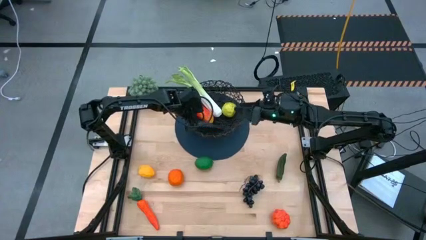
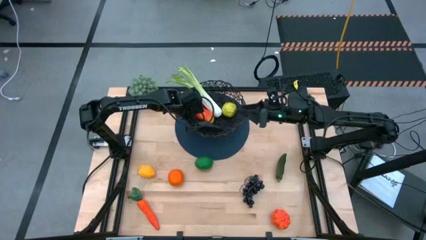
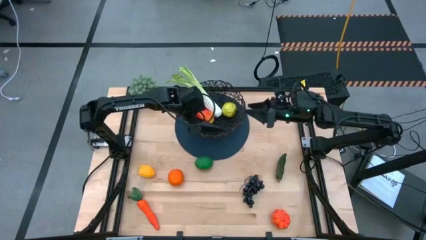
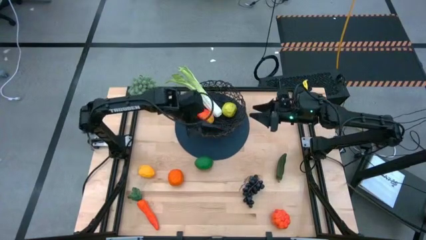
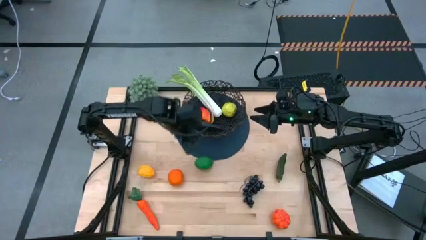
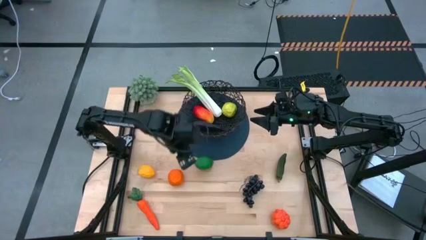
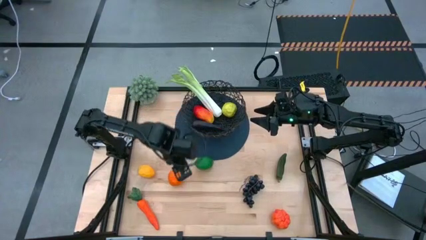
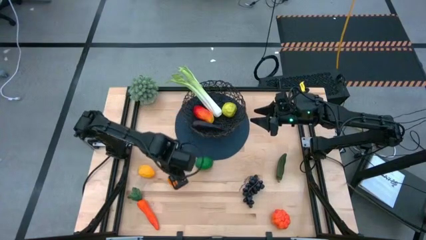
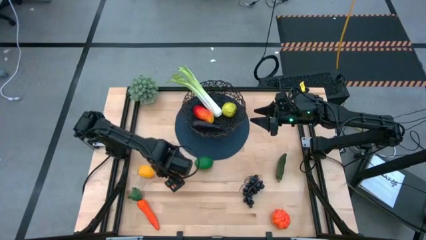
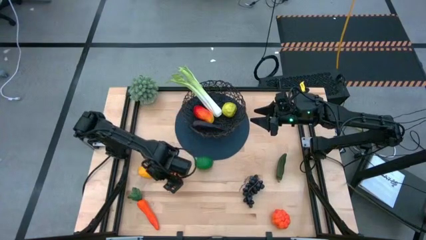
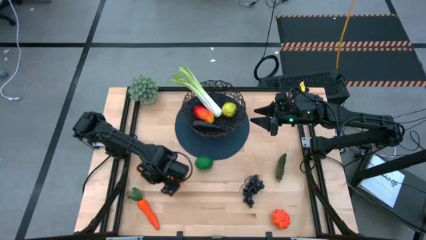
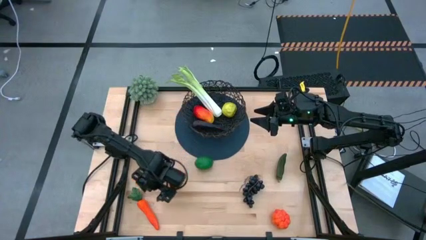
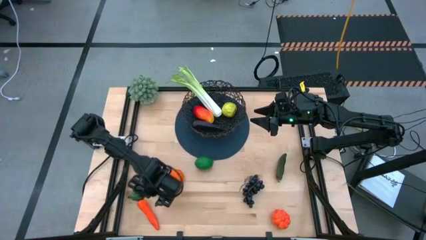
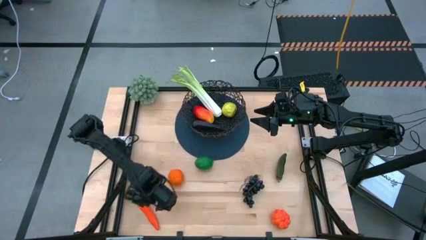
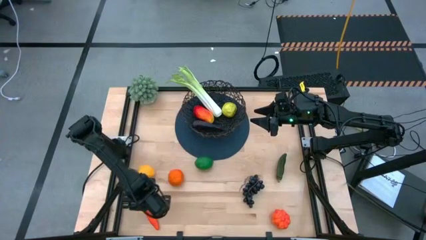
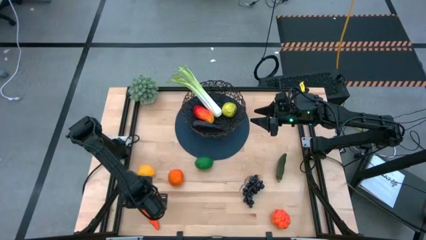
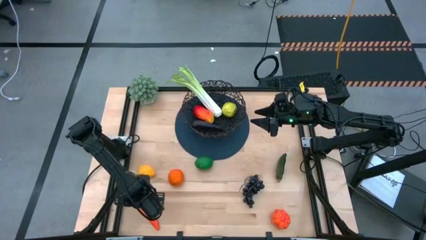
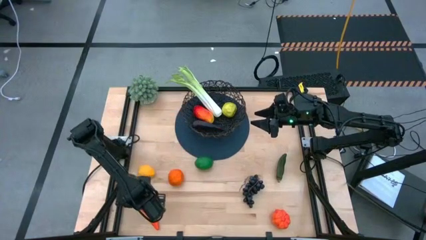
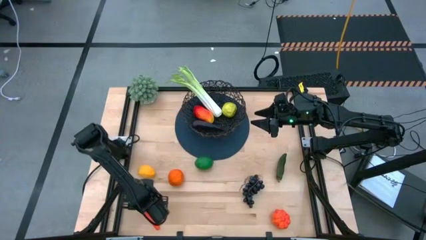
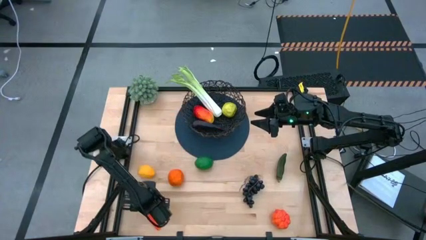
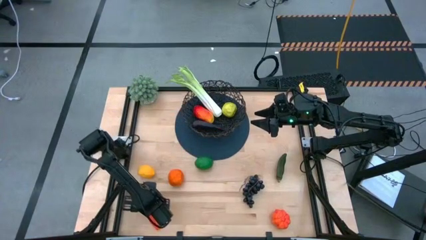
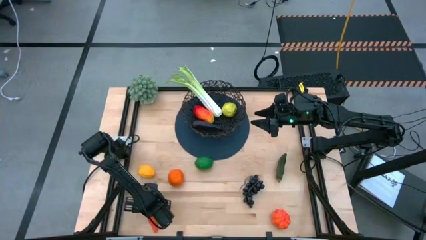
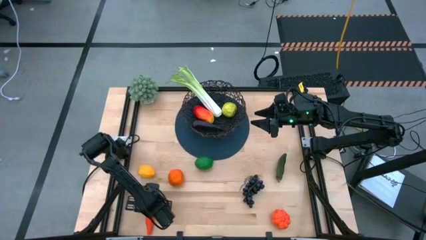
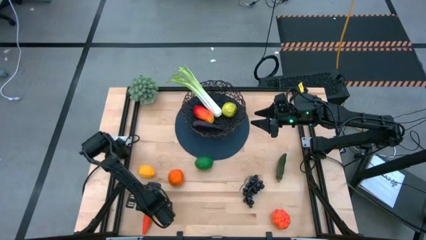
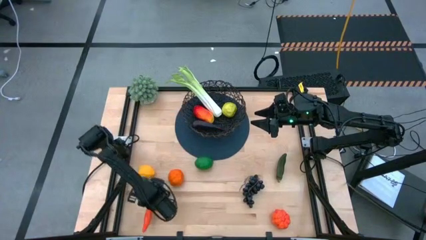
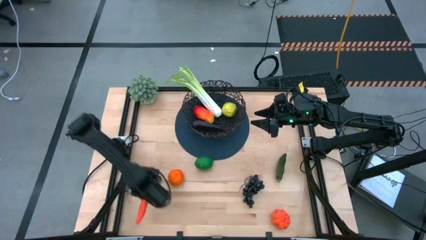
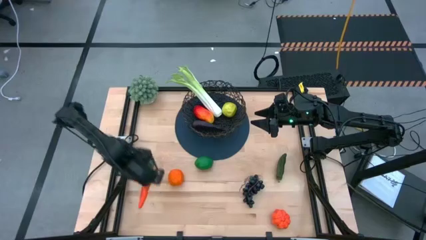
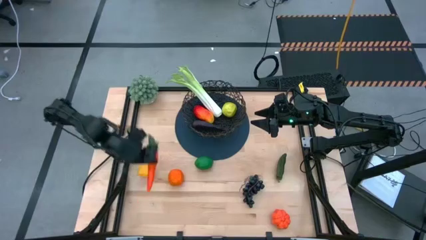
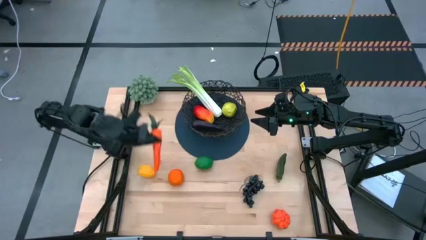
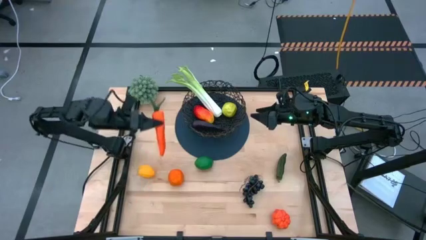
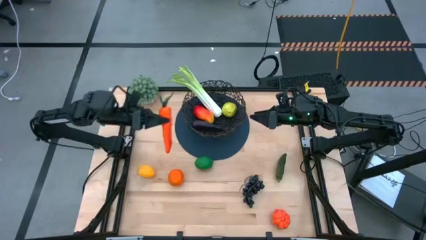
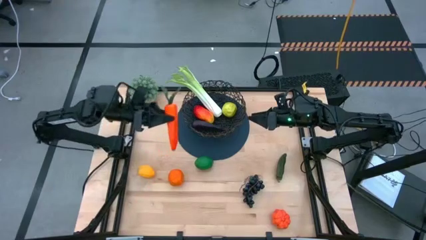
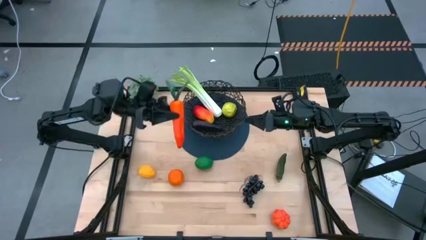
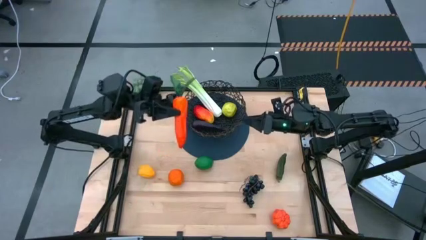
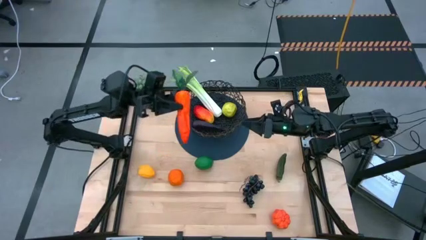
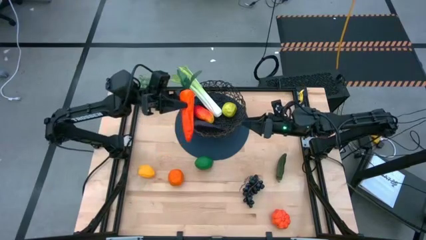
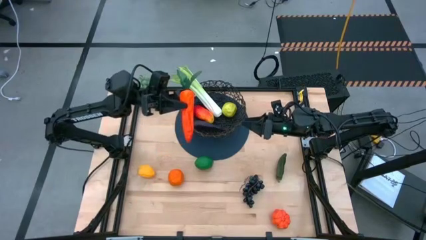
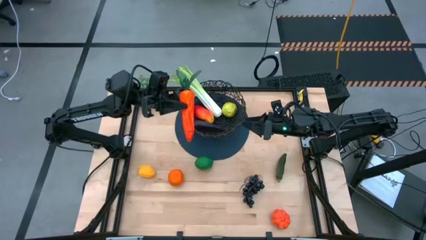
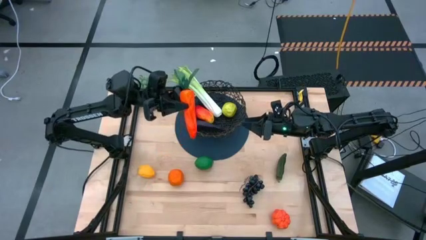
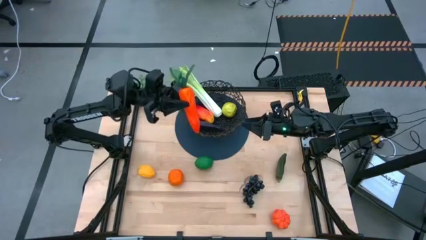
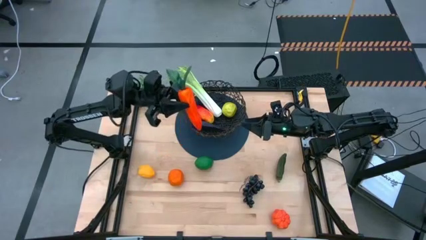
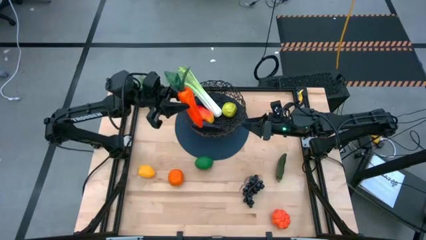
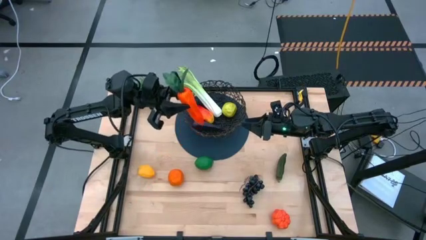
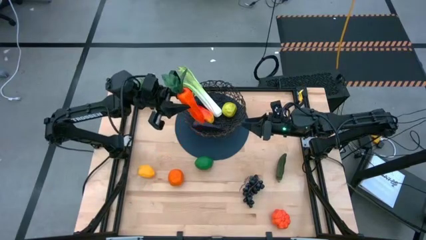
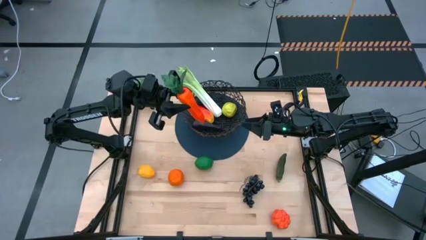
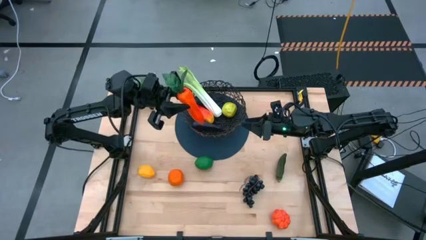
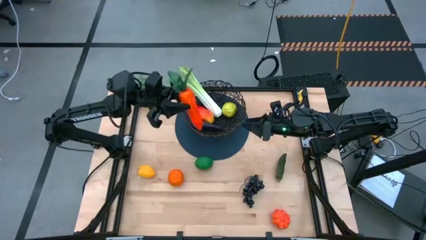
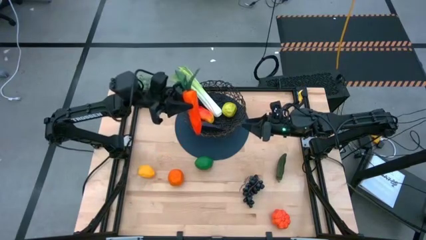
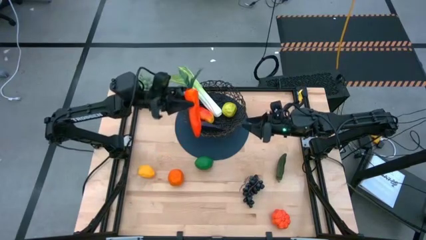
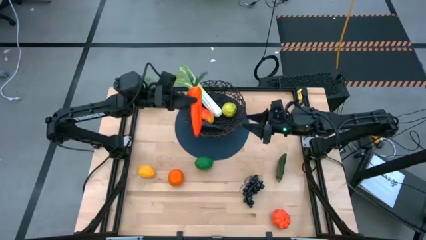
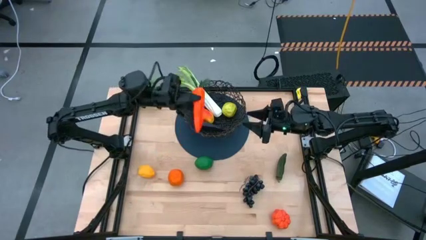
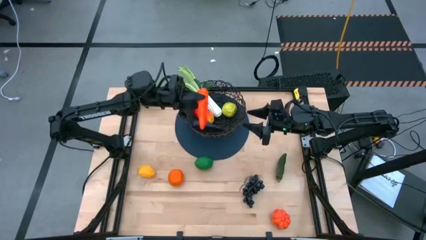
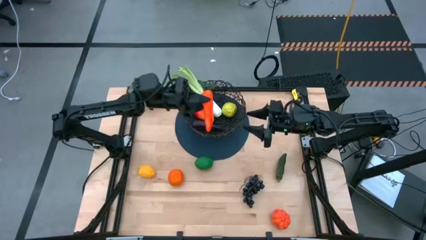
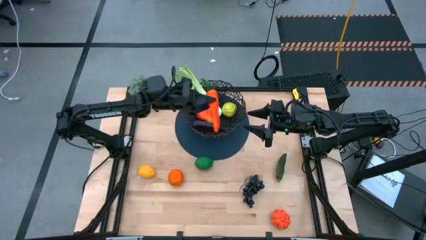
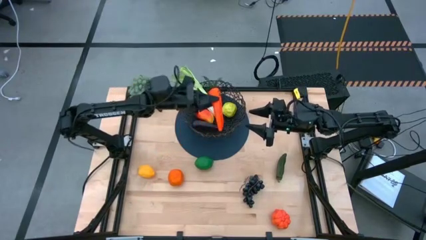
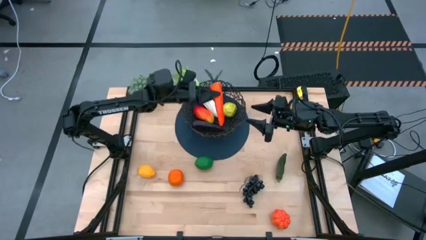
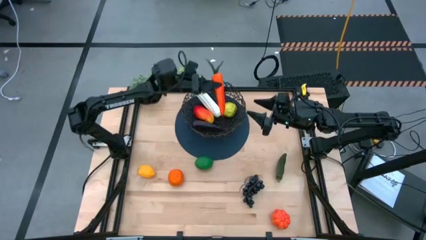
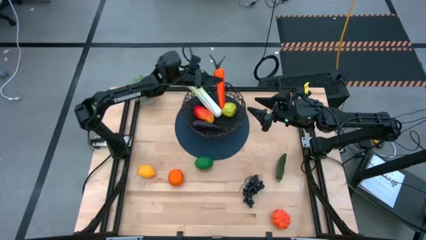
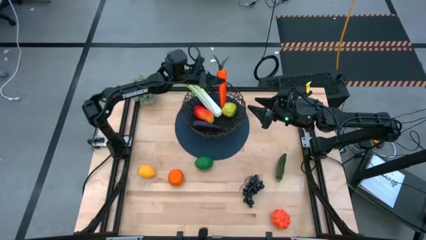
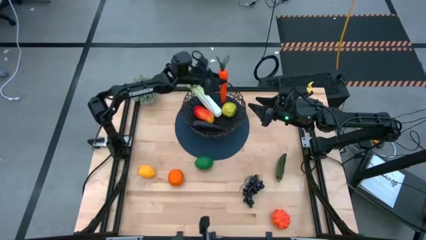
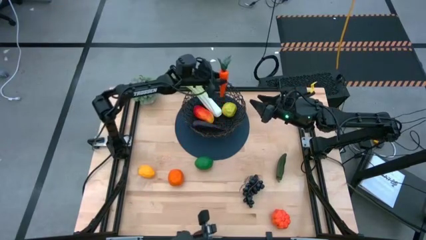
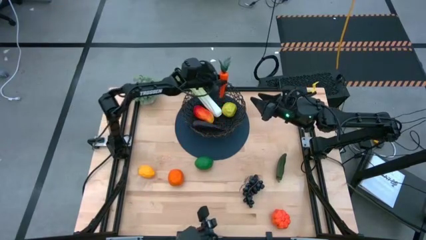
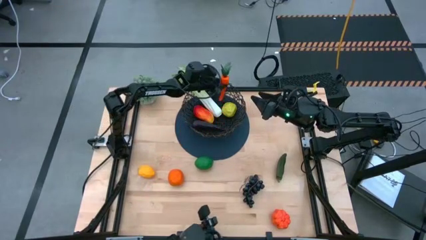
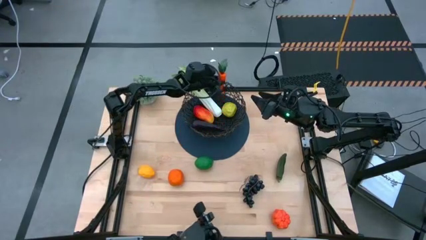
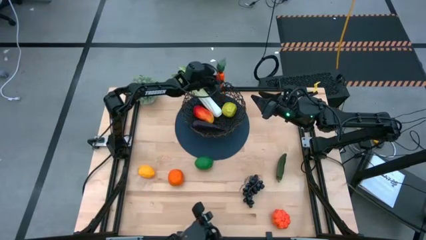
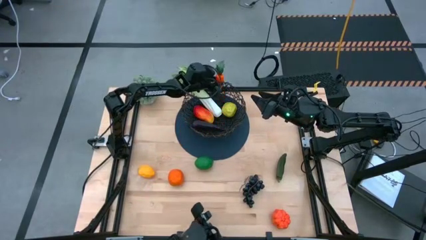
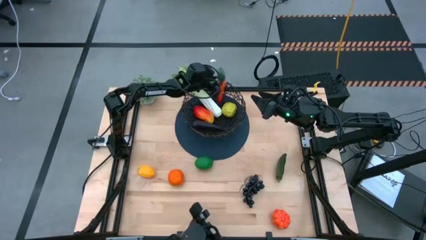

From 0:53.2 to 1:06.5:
Task: Build produce basket
Put the orange carrot into the wire basket
